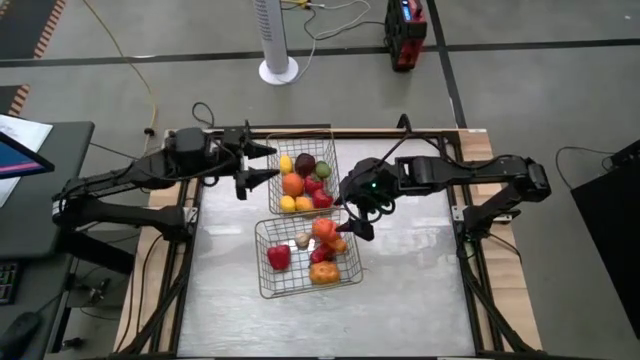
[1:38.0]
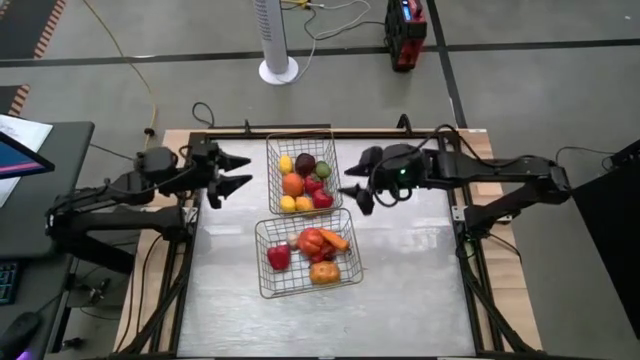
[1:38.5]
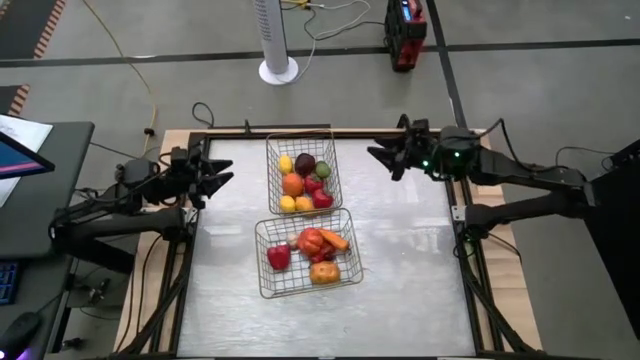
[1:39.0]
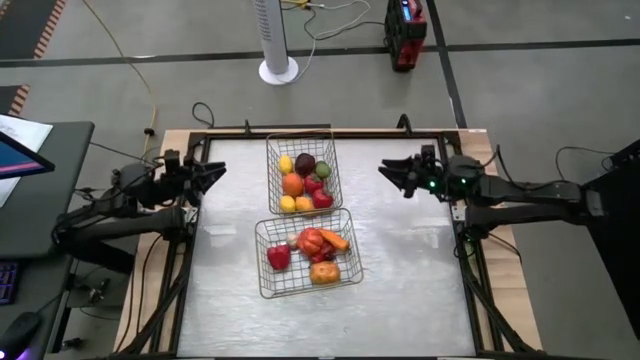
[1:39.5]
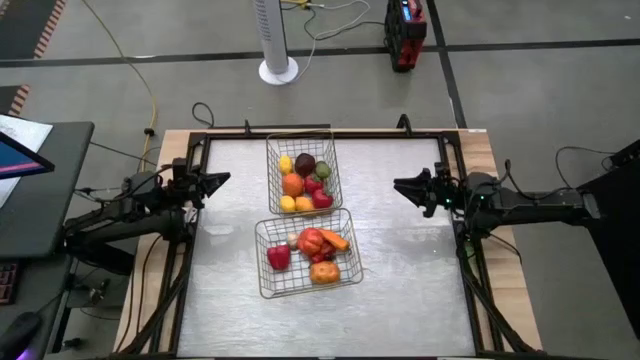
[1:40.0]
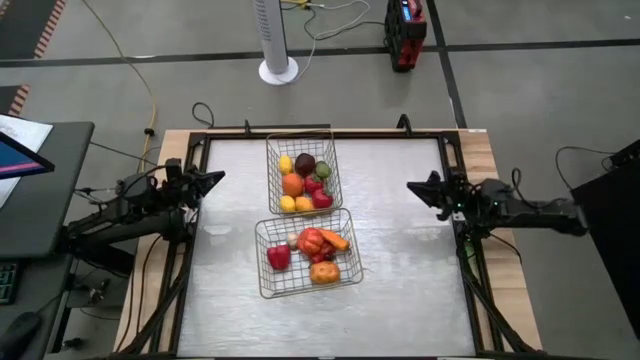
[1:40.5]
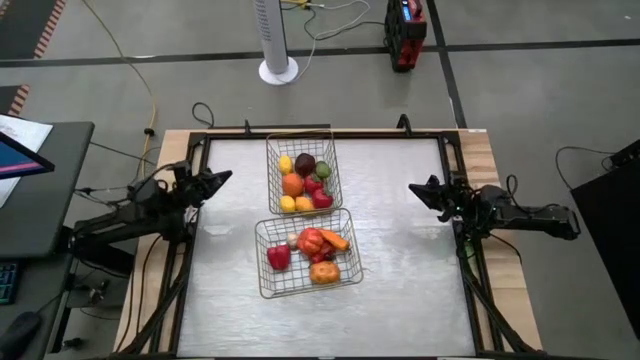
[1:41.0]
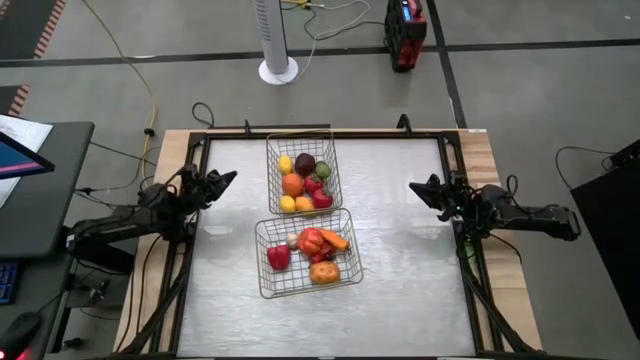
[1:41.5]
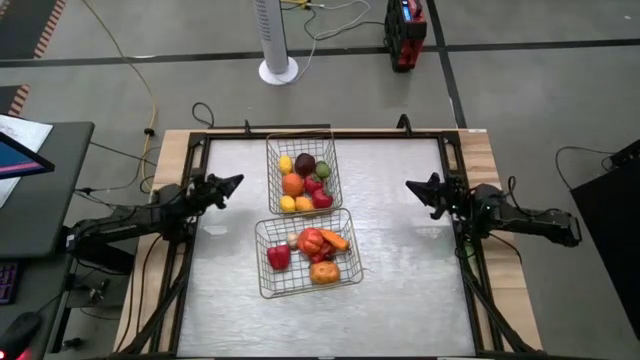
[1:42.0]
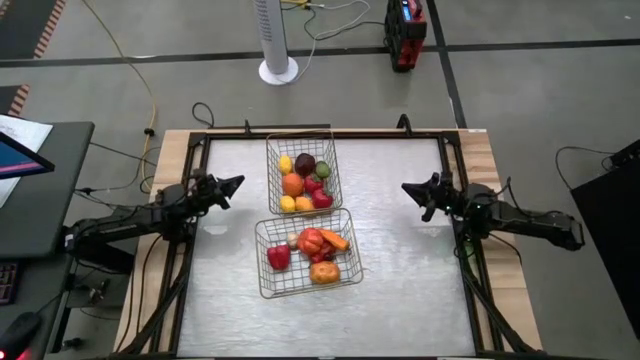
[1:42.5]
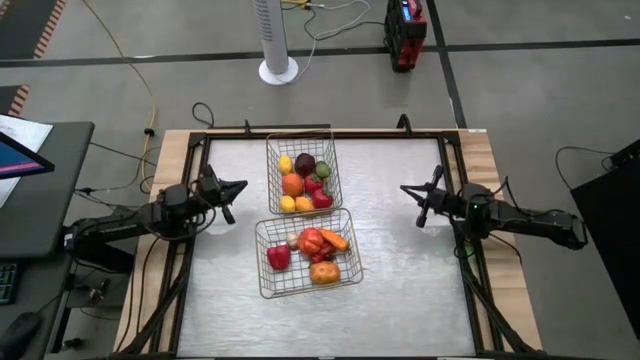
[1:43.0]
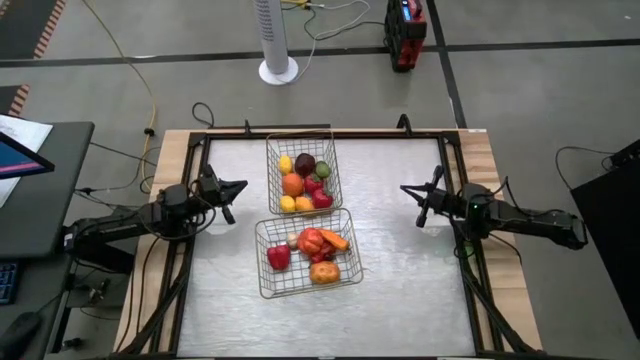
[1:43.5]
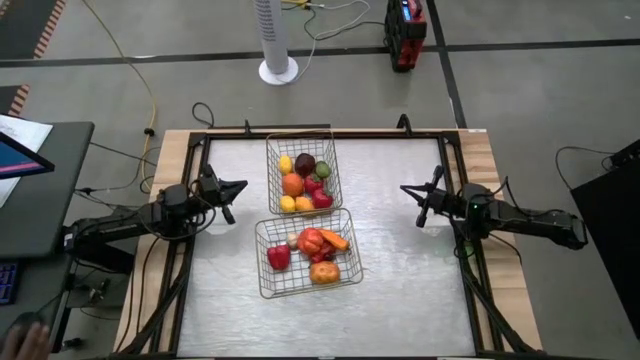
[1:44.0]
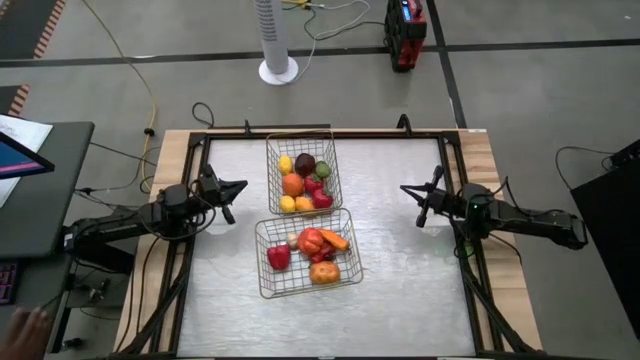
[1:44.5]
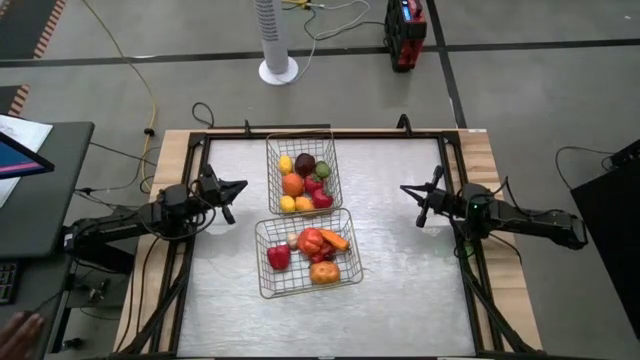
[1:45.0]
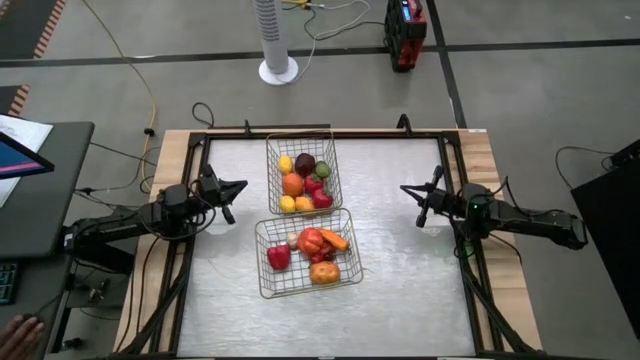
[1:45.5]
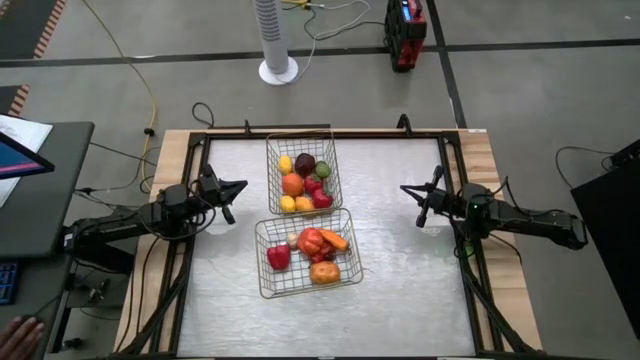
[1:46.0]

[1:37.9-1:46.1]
Task: Sort produce into baskets
Return to Home Position

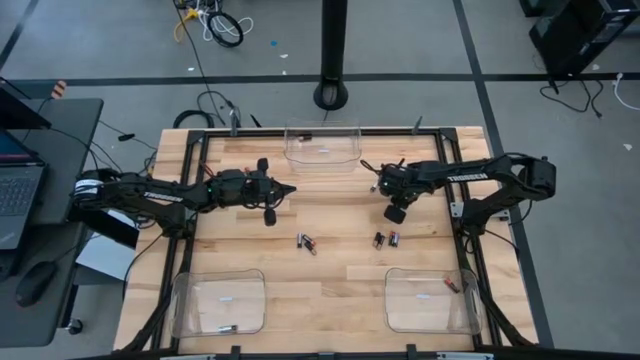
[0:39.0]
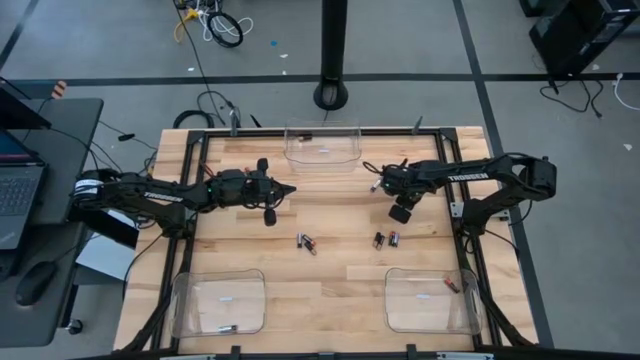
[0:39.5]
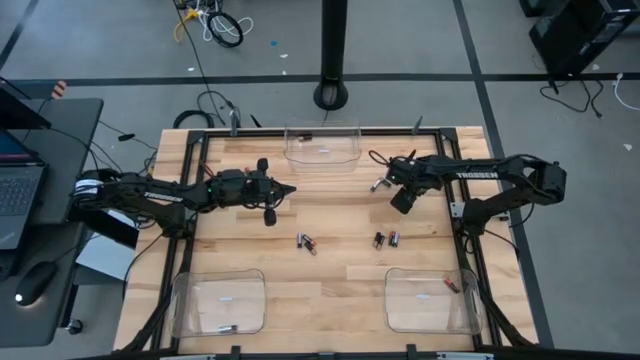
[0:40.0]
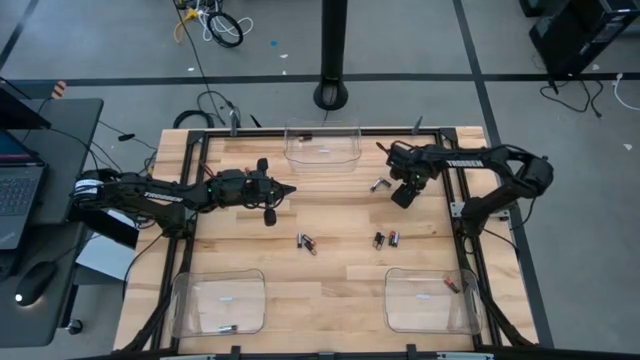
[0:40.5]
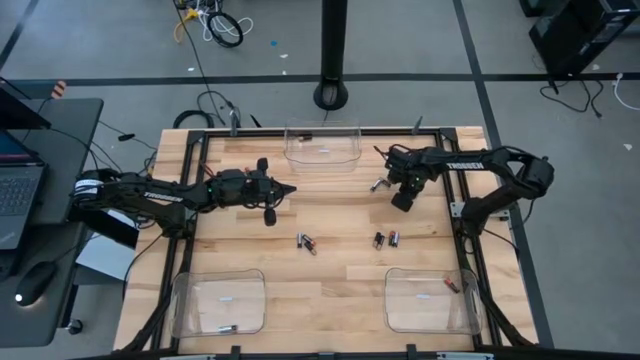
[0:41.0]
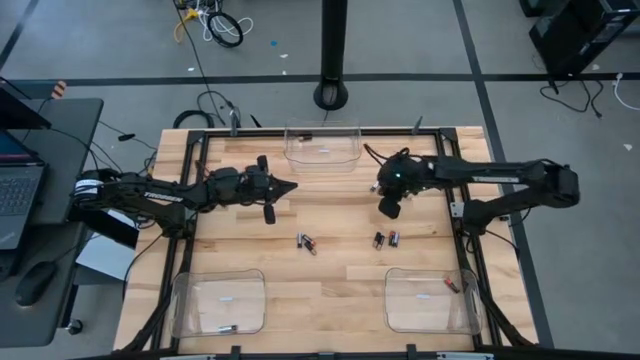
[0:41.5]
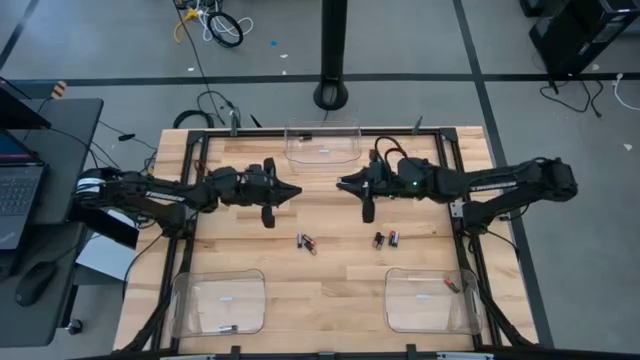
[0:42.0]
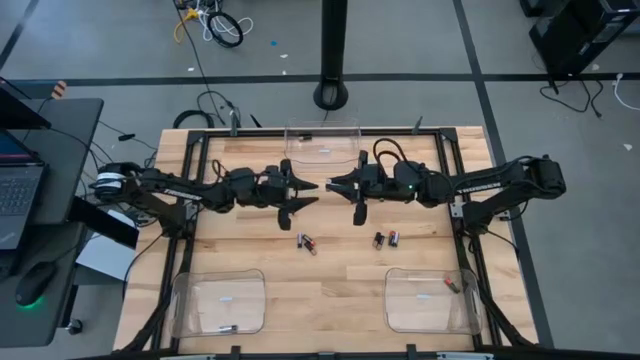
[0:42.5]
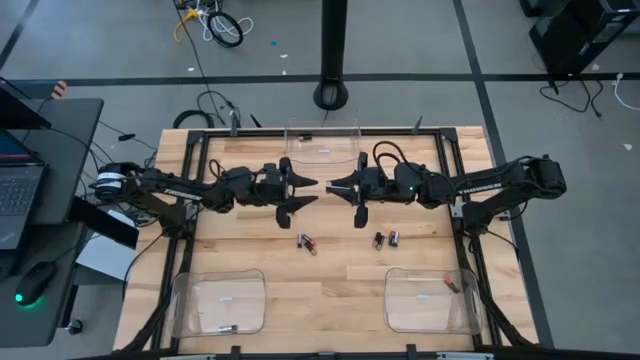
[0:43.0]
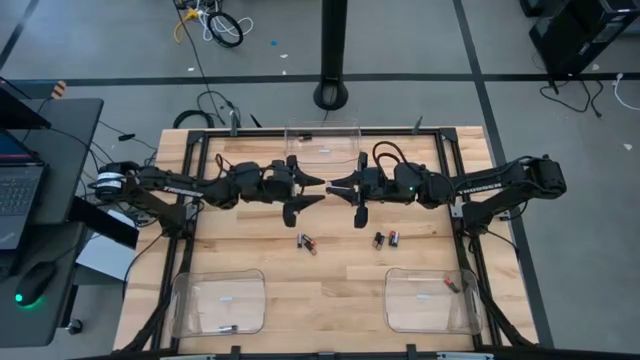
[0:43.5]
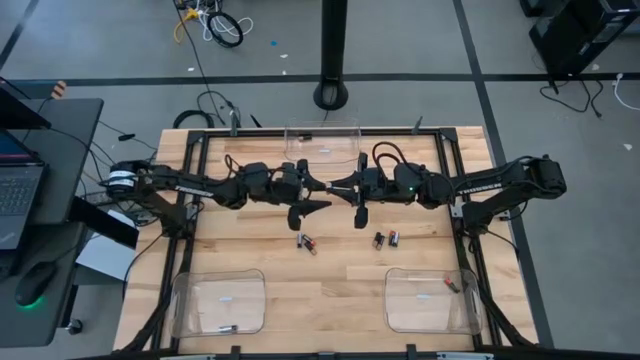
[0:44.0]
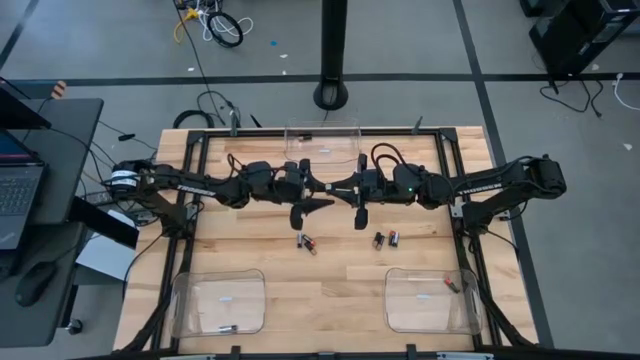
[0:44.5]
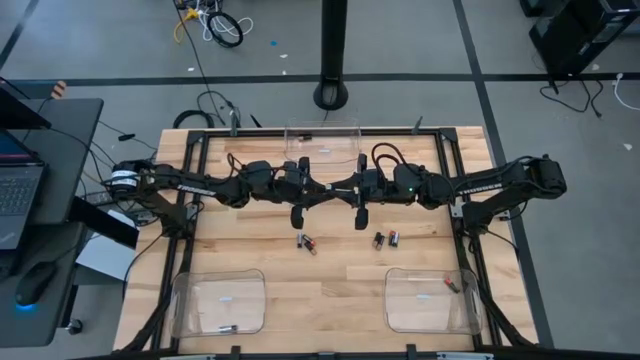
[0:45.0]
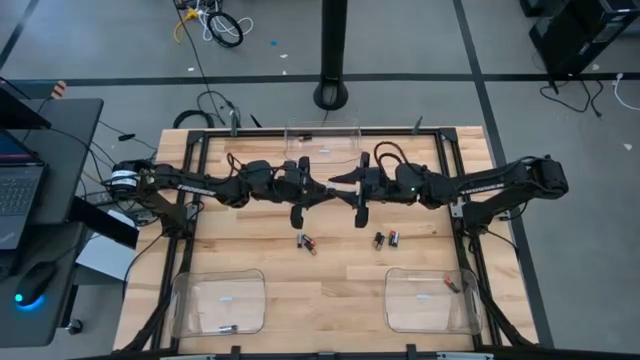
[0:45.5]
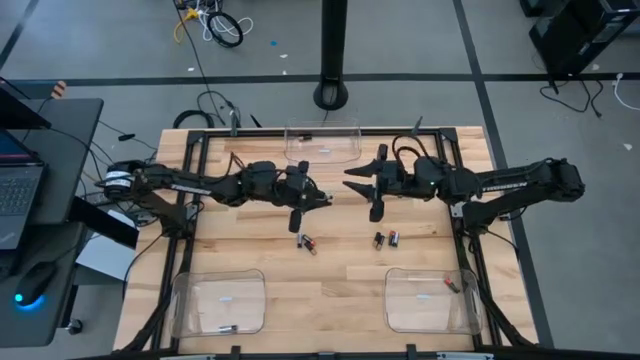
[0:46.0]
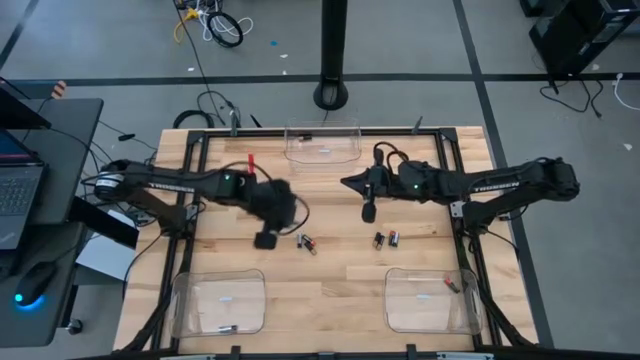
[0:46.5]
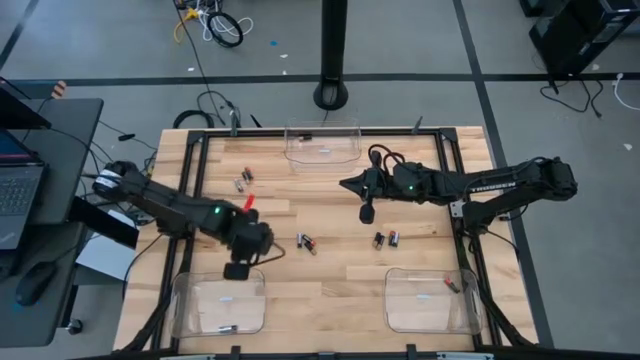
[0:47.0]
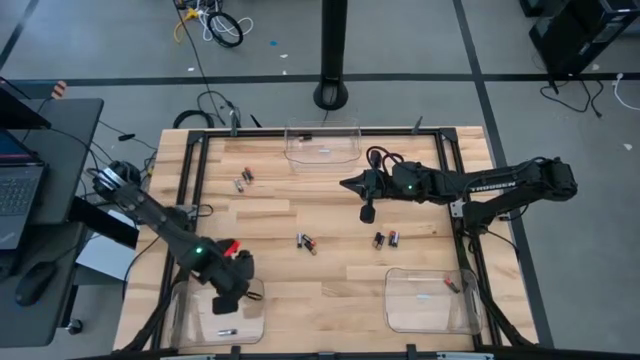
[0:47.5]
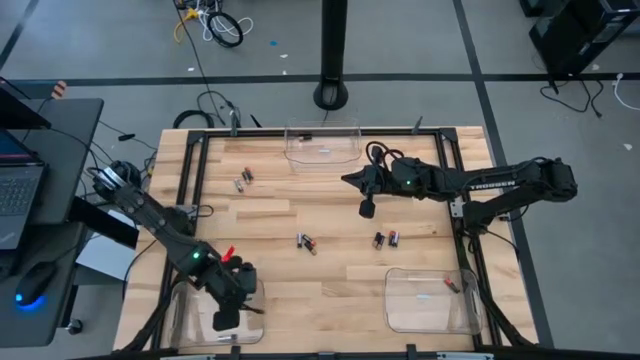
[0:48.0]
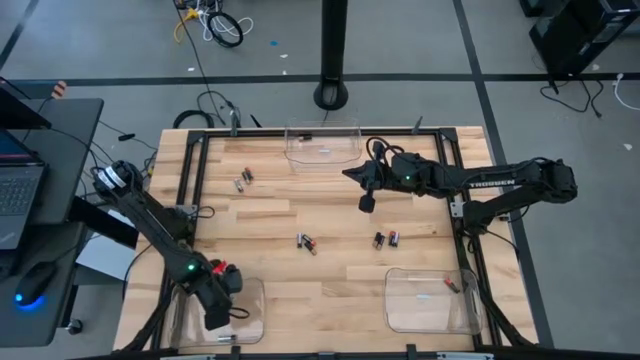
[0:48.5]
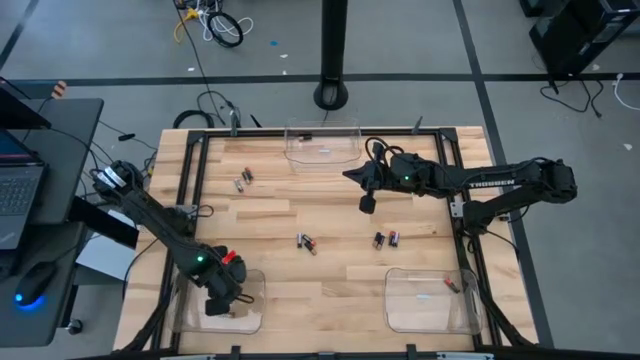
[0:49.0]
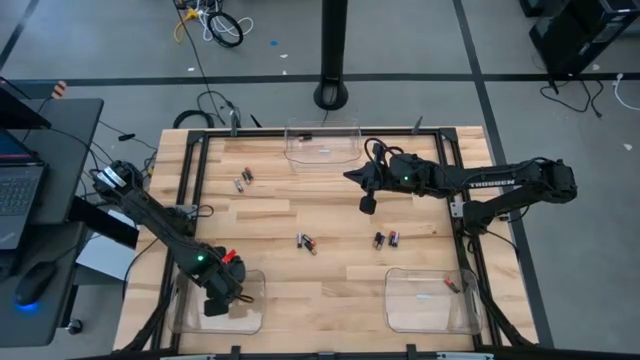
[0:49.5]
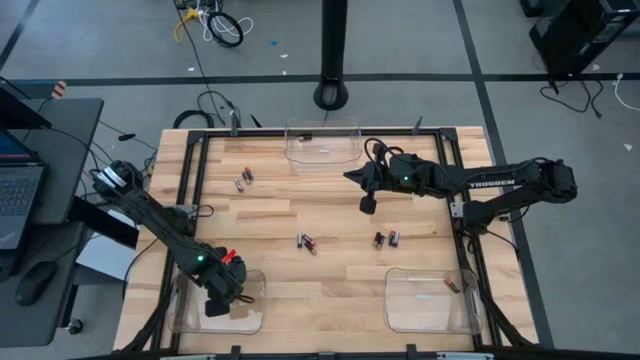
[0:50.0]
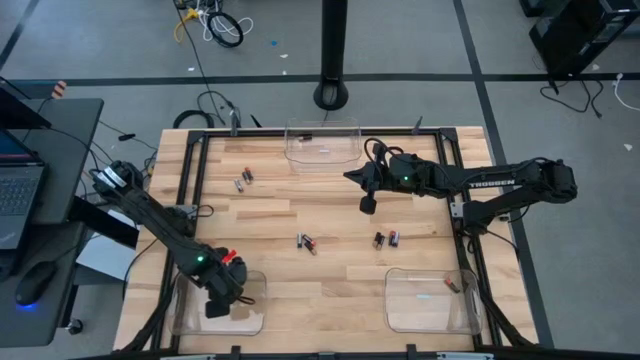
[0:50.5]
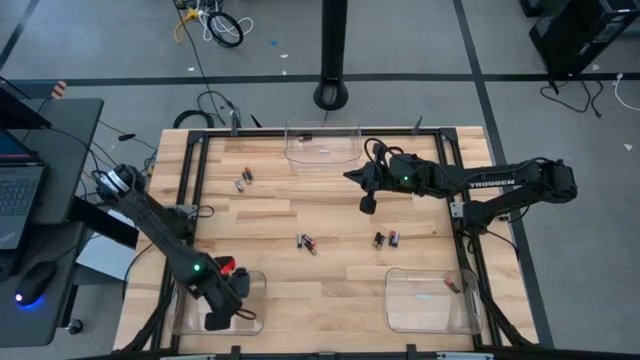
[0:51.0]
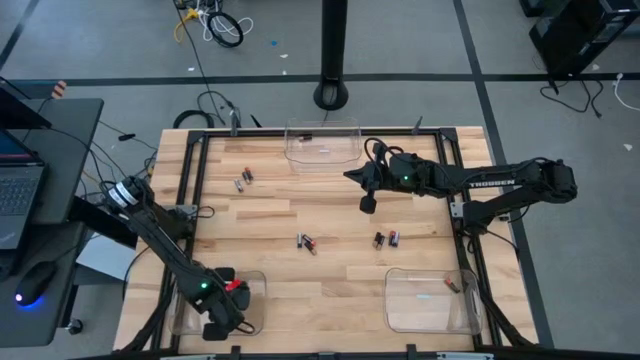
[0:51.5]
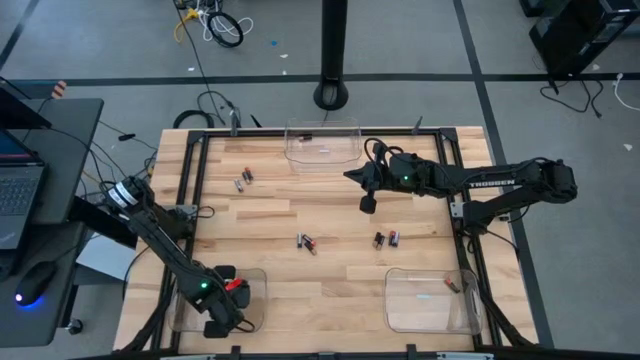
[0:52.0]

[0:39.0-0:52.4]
Task: Sort batteries
Put the silver battery into the left bottom transparent bin
